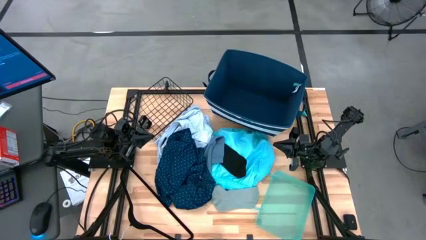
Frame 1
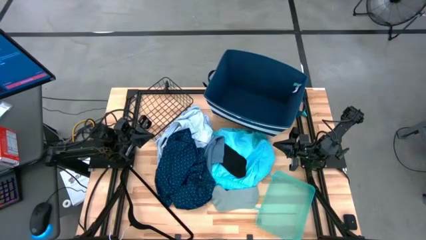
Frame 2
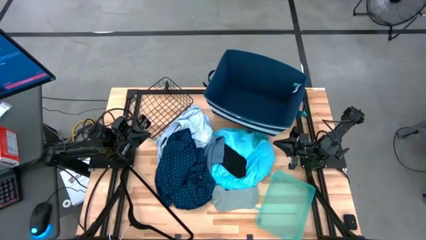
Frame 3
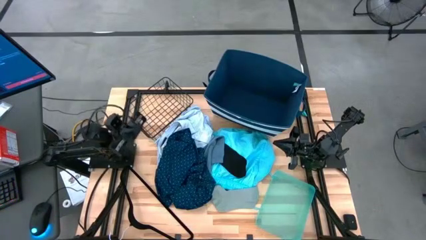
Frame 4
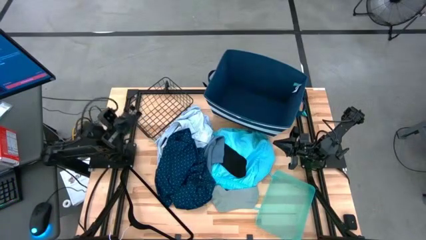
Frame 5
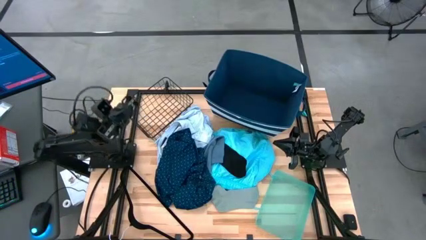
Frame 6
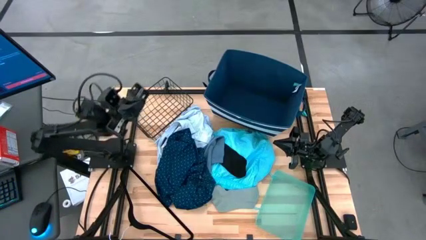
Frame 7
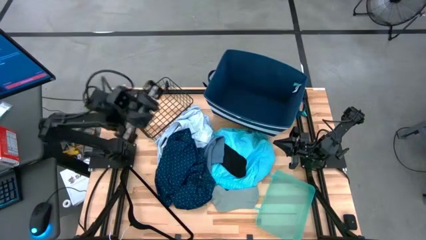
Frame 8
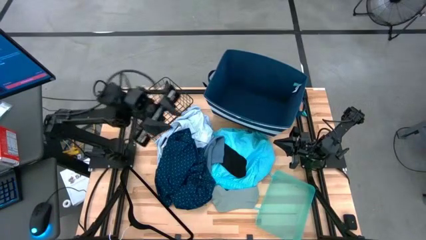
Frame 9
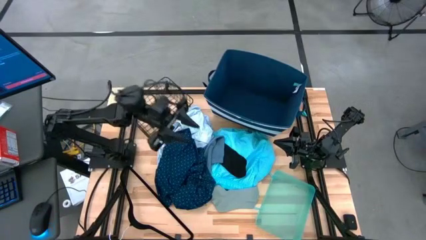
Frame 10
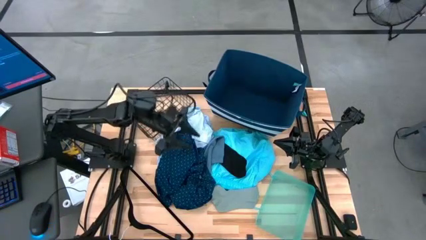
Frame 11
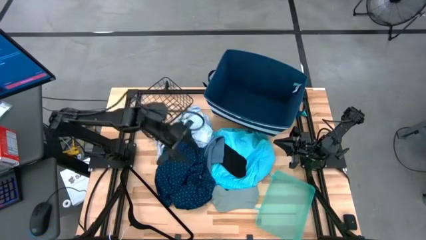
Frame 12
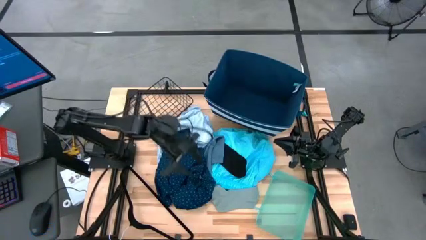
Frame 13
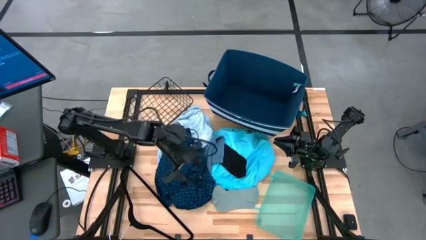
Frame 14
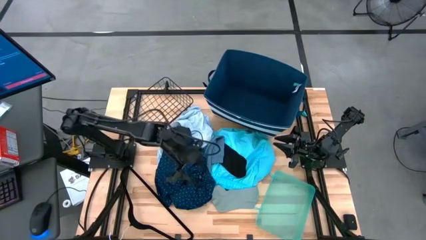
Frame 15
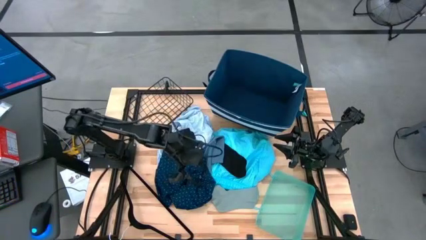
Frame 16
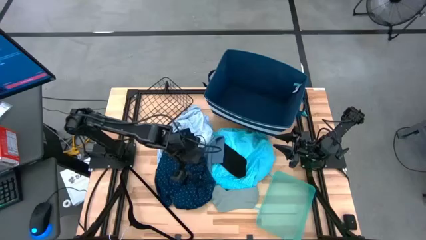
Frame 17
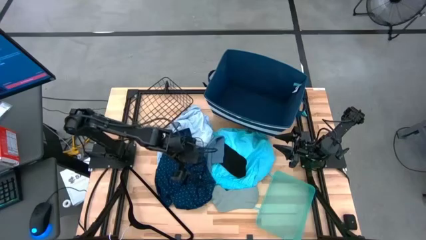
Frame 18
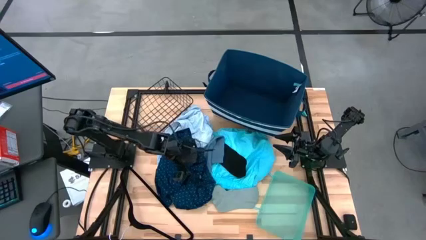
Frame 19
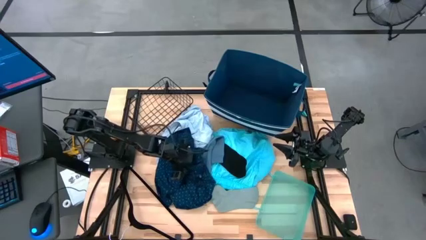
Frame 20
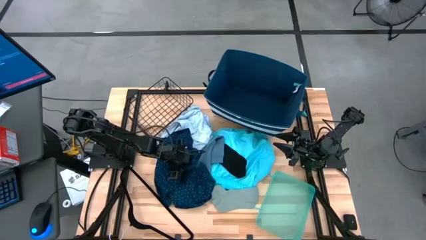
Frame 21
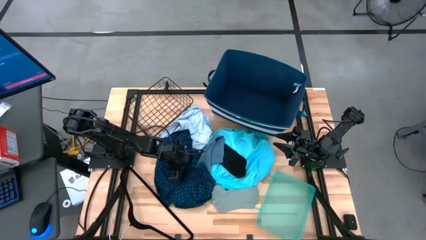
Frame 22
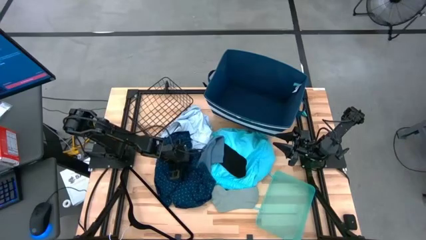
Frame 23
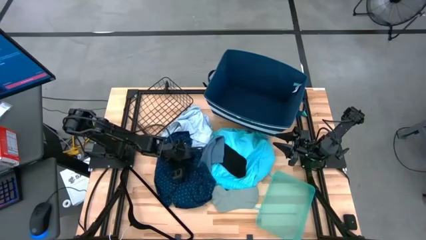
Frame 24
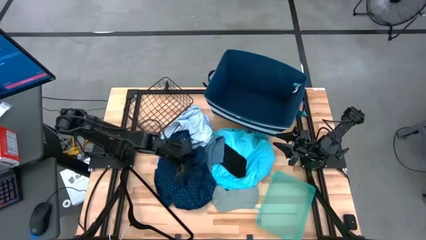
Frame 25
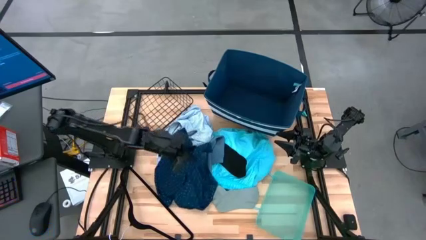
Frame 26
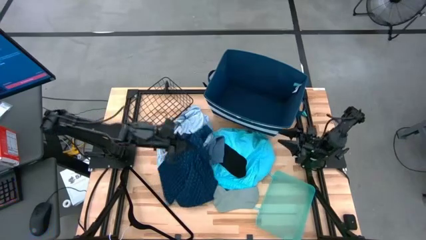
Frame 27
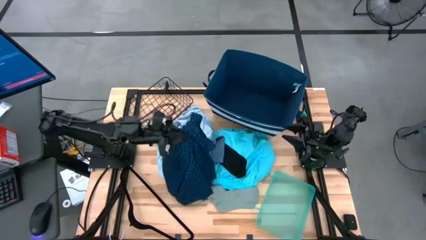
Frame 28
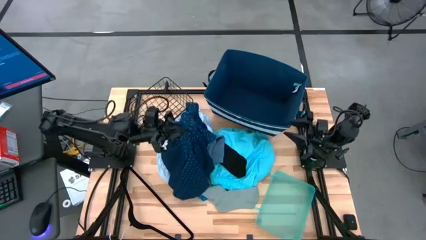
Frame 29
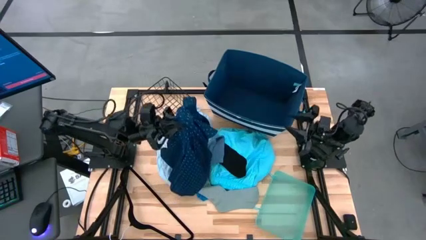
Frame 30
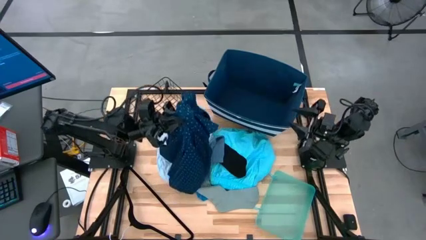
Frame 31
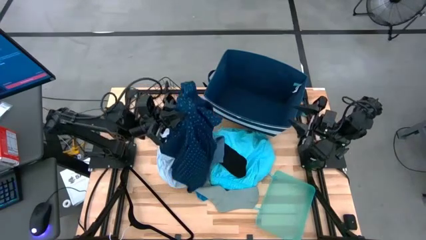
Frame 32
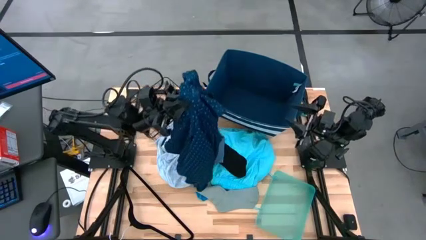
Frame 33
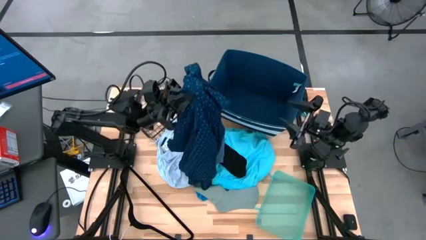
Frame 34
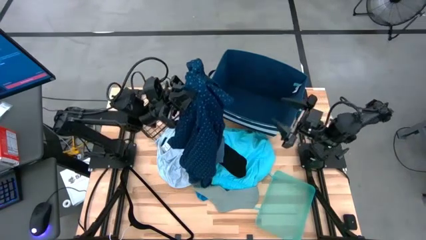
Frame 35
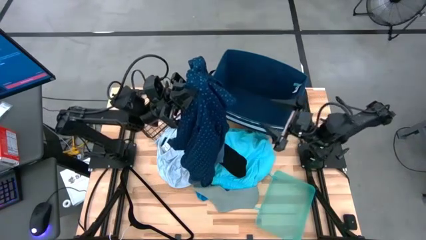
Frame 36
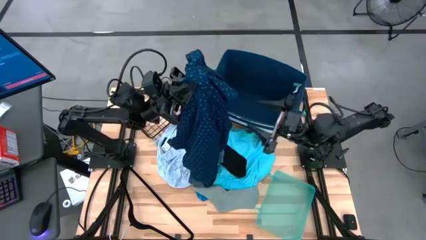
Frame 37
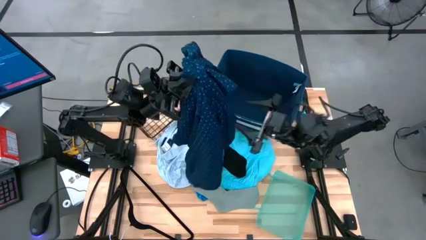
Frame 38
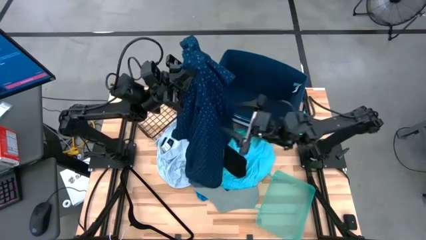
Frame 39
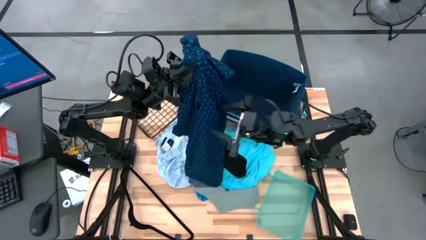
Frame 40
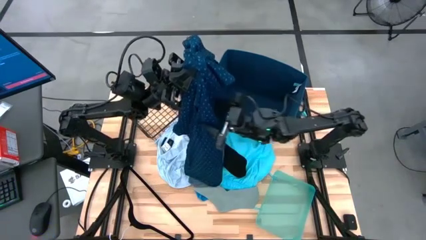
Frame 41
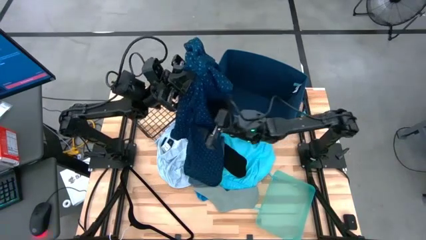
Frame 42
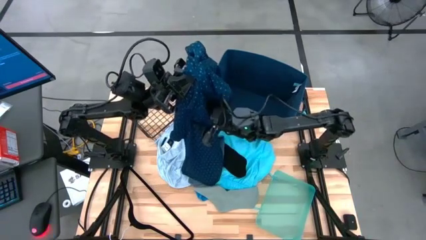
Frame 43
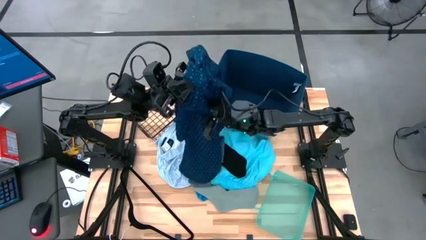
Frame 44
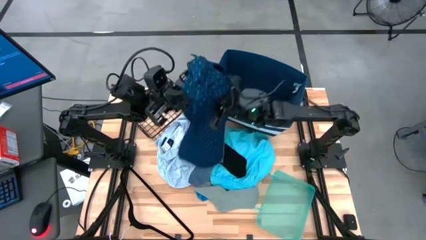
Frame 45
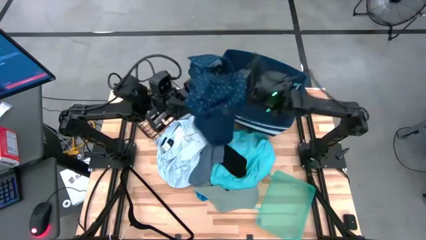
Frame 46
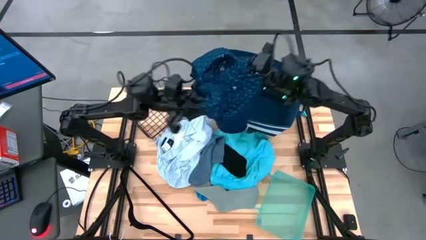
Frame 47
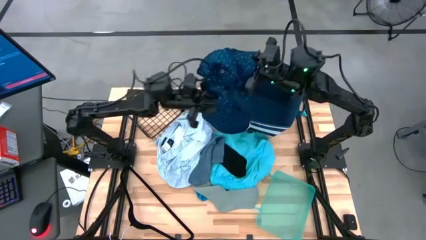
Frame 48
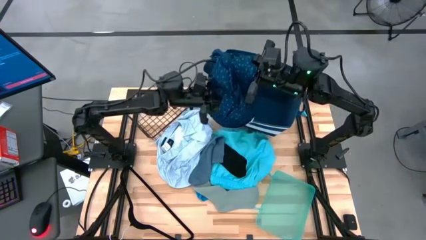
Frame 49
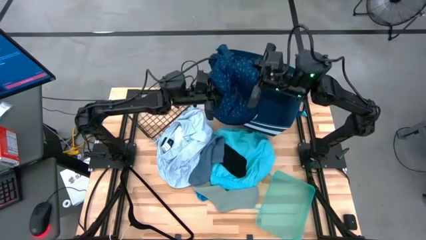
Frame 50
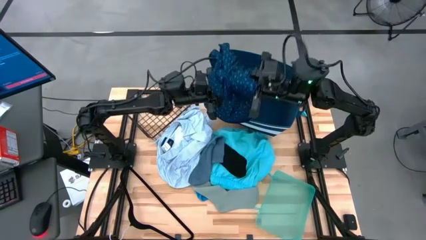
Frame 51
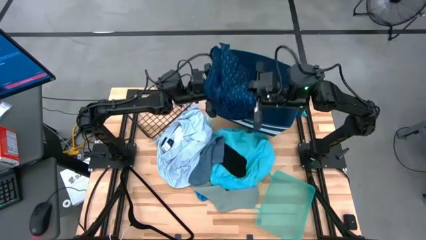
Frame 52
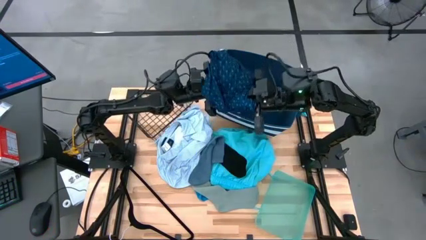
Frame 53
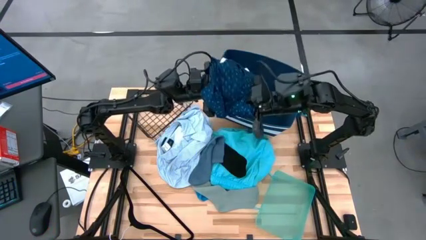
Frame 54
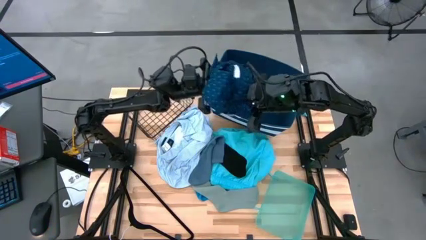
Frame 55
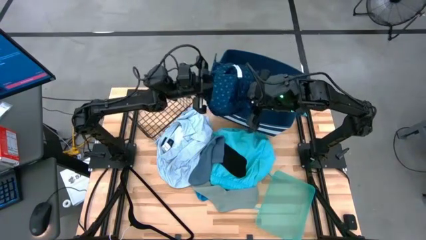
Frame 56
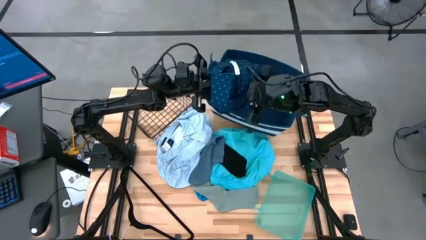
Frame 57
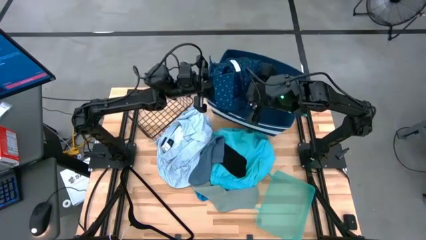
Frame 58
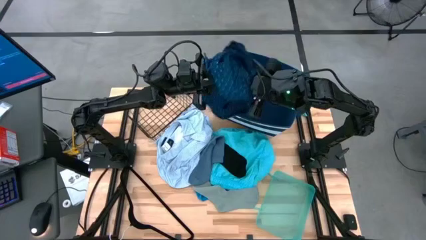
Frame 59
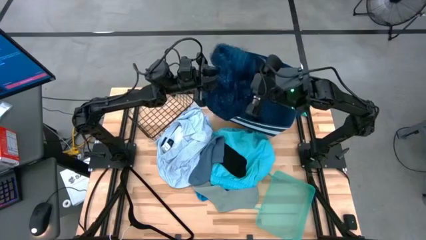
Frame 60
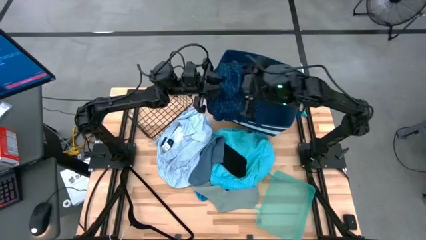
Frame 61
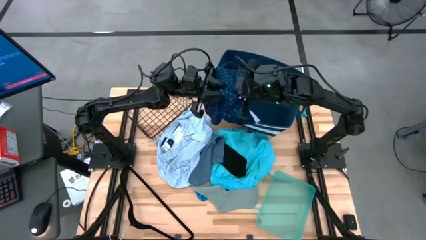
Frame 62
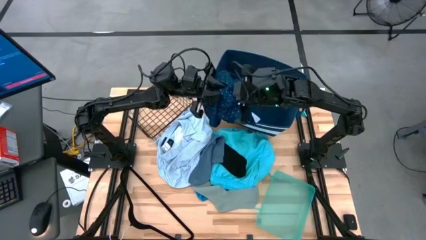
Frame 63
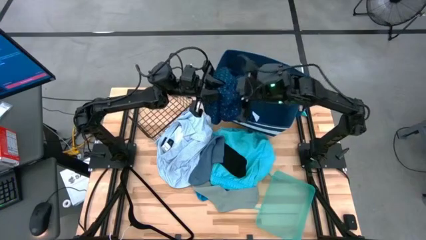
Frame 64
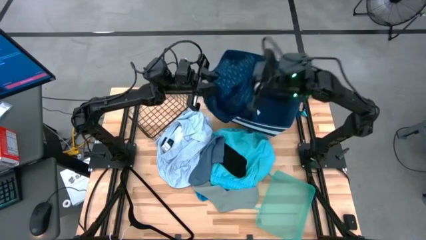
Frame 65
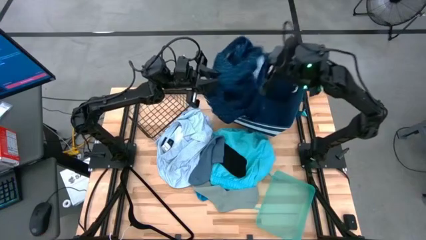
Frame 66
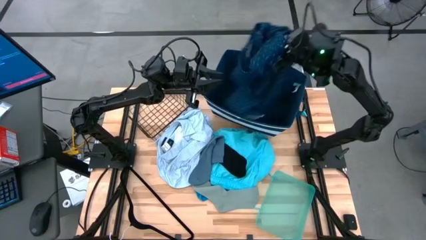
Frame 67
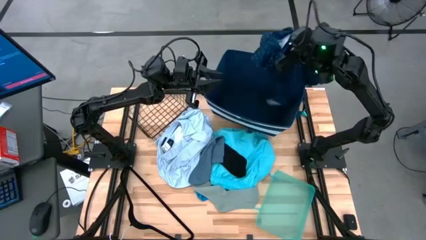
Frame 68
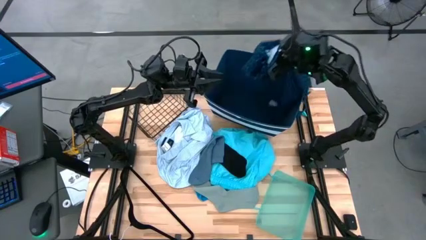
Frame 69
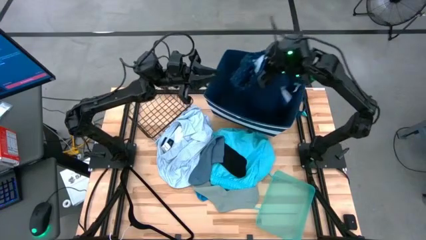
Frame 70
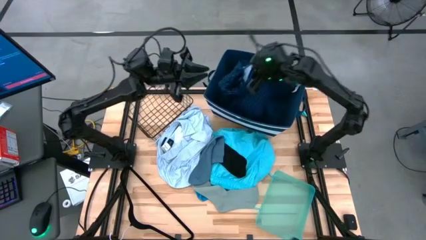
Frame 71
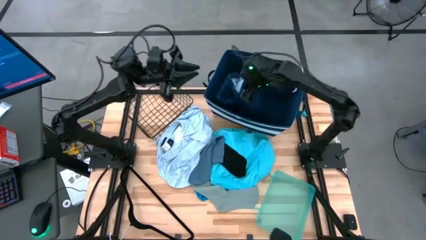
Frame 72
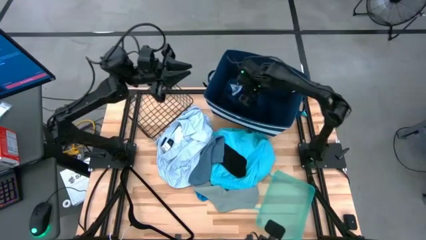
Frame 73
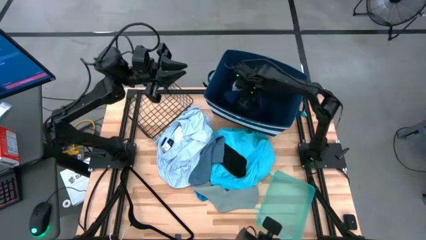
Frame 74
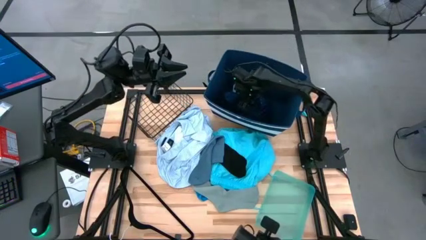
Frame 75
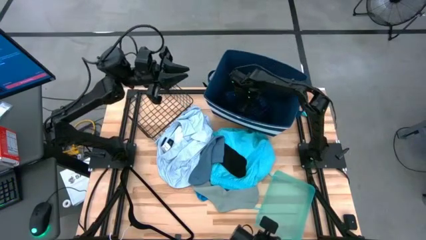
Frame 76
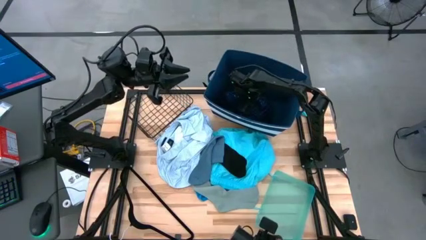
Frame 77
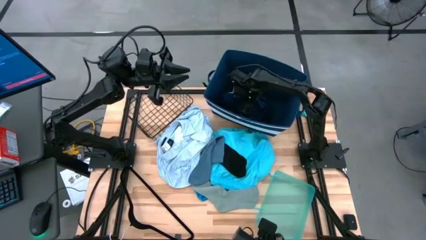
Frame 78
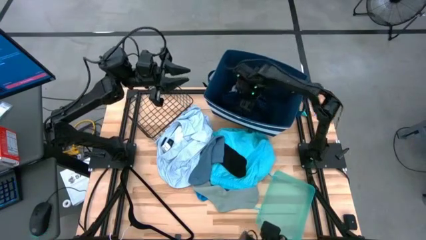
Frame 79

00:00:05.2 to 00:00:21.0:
Task: Pick & Place Cloths
Put the dark blue polo shirt into the blue laundry organizer
